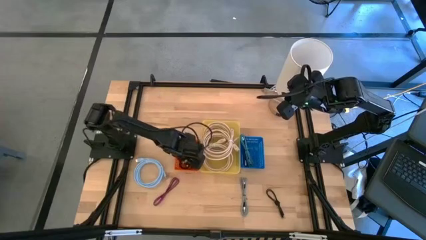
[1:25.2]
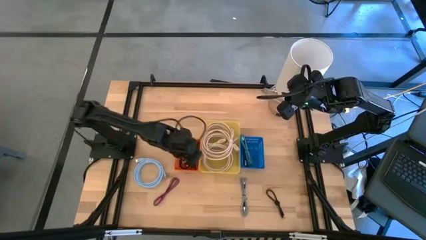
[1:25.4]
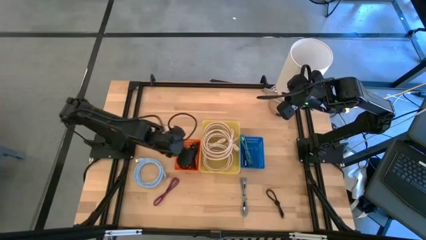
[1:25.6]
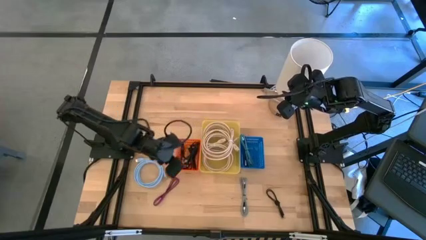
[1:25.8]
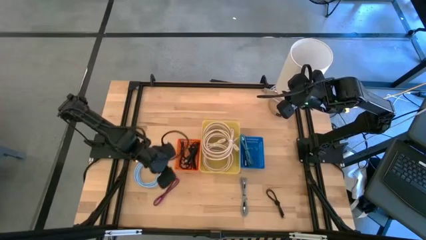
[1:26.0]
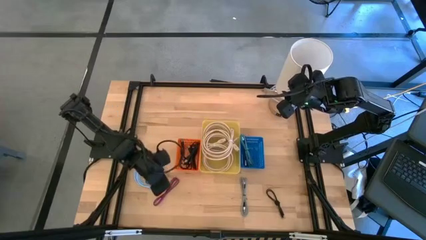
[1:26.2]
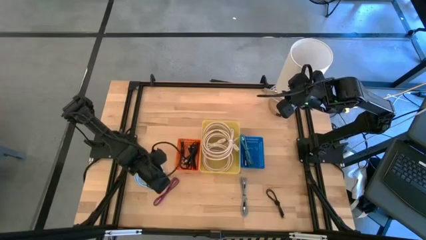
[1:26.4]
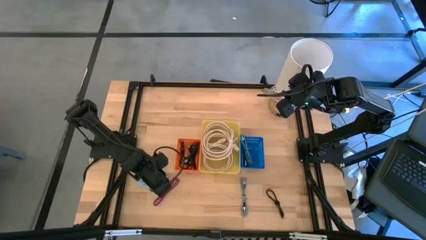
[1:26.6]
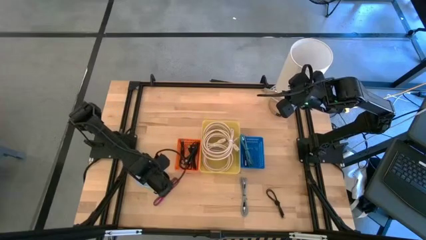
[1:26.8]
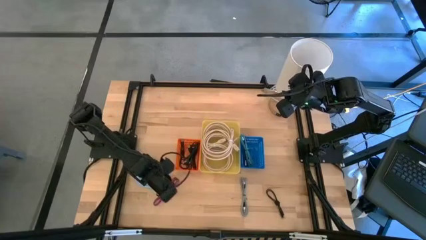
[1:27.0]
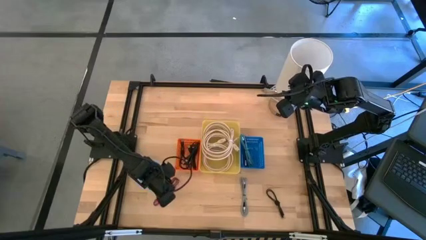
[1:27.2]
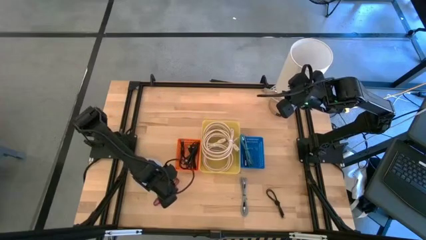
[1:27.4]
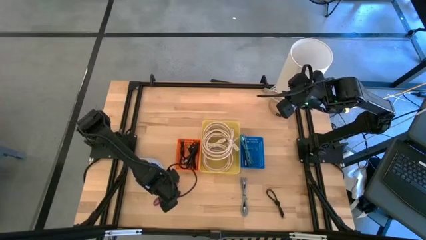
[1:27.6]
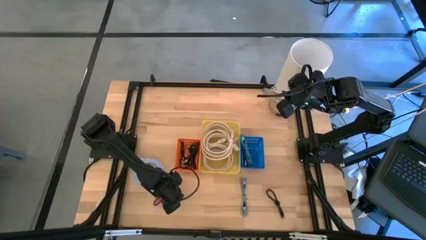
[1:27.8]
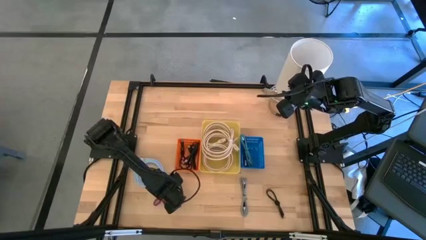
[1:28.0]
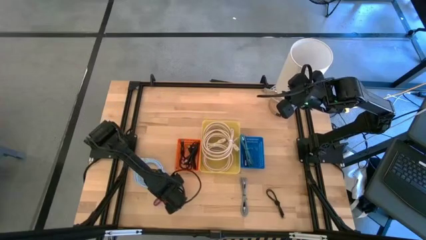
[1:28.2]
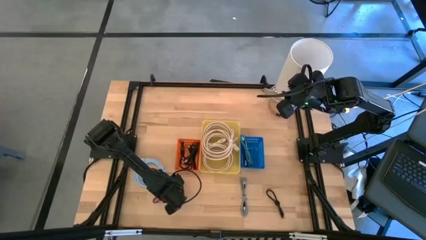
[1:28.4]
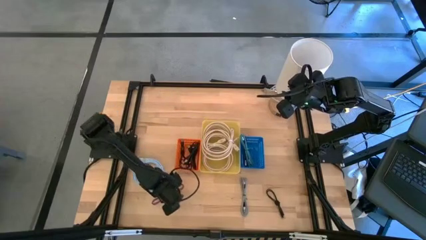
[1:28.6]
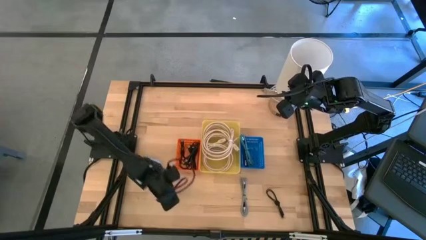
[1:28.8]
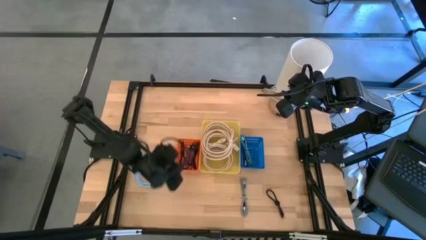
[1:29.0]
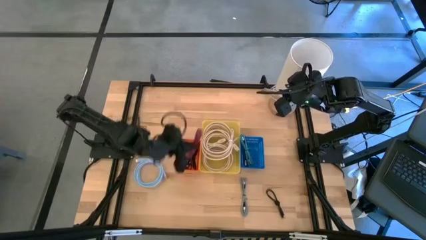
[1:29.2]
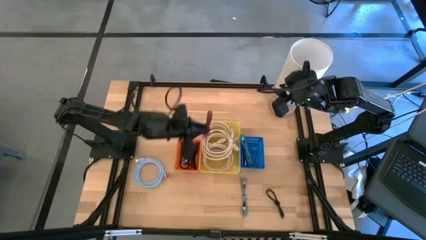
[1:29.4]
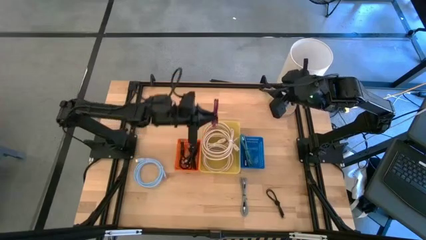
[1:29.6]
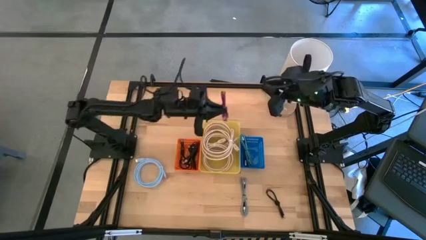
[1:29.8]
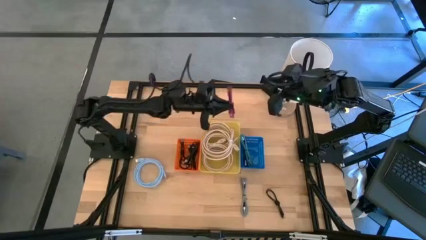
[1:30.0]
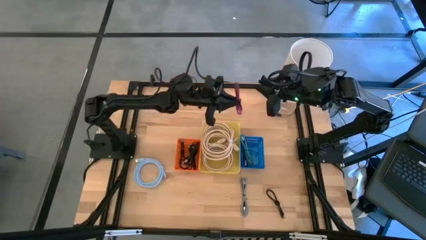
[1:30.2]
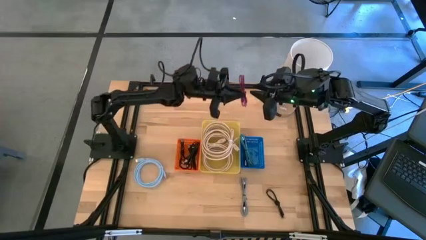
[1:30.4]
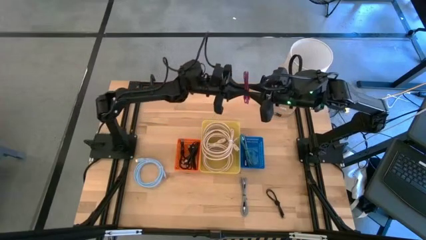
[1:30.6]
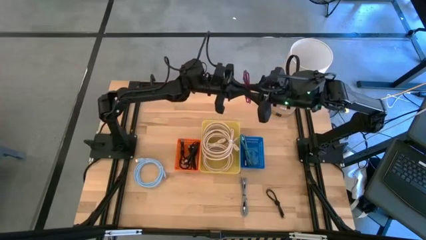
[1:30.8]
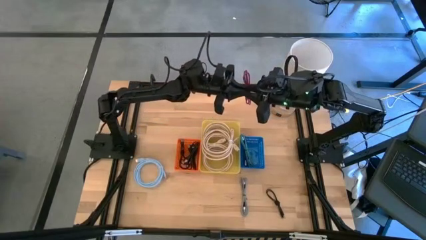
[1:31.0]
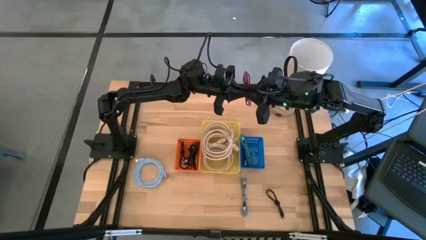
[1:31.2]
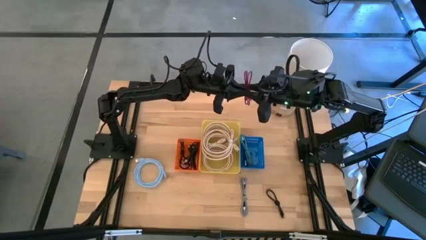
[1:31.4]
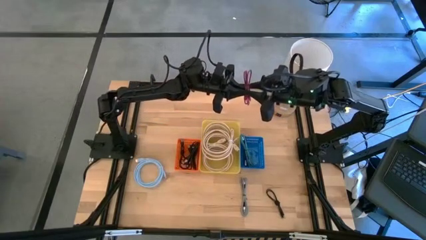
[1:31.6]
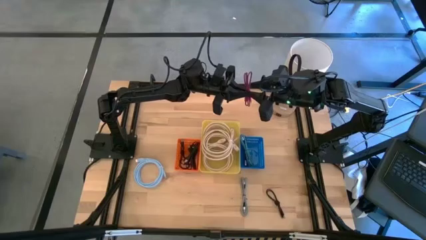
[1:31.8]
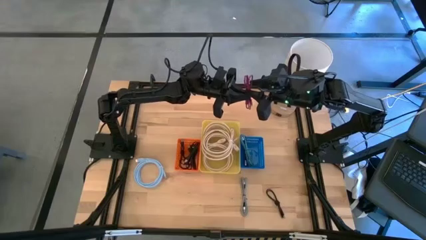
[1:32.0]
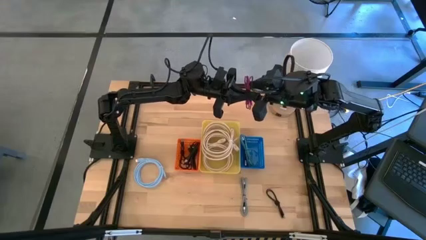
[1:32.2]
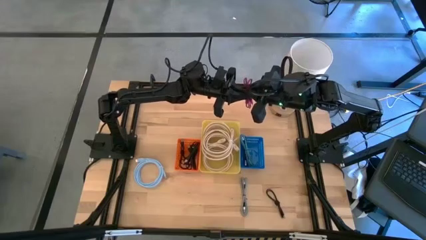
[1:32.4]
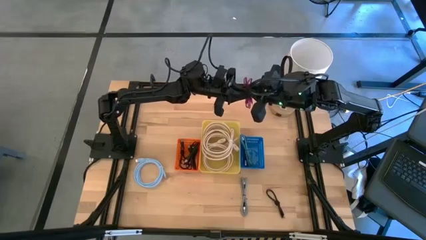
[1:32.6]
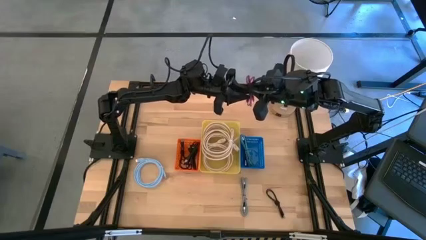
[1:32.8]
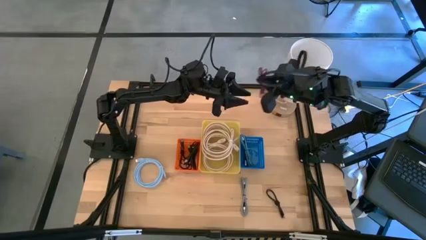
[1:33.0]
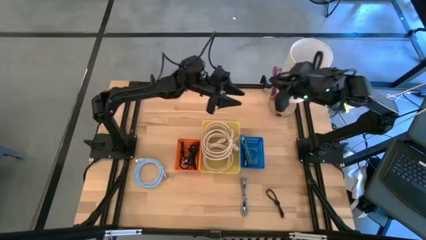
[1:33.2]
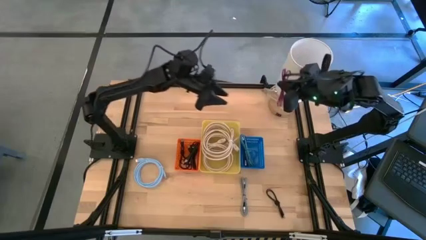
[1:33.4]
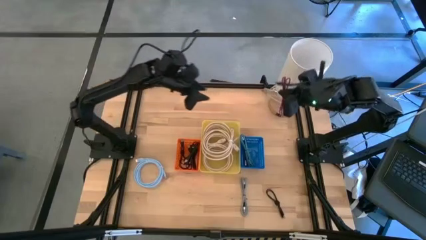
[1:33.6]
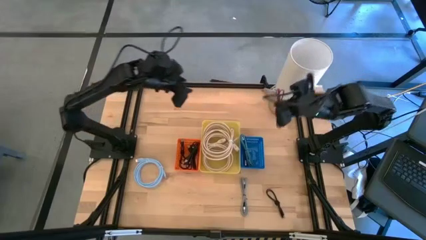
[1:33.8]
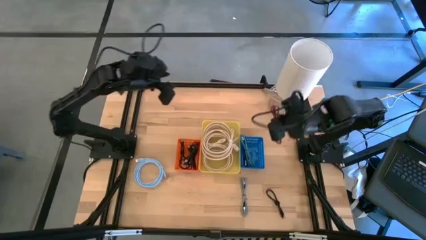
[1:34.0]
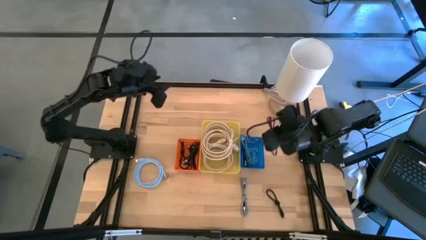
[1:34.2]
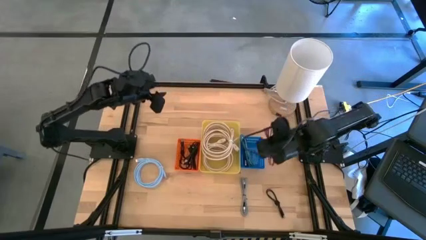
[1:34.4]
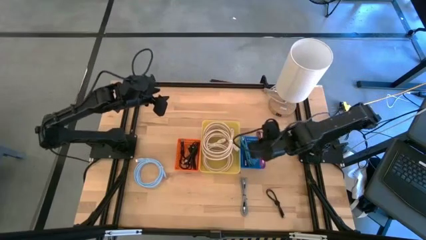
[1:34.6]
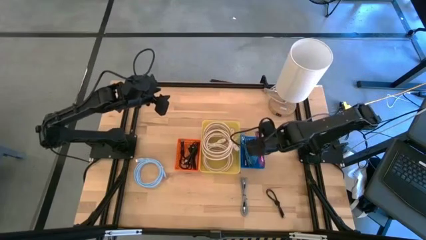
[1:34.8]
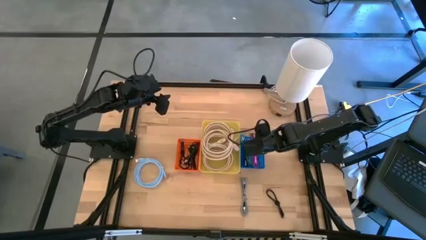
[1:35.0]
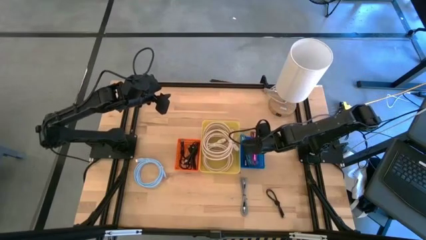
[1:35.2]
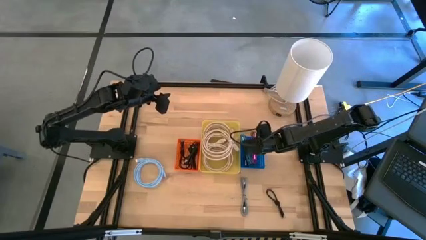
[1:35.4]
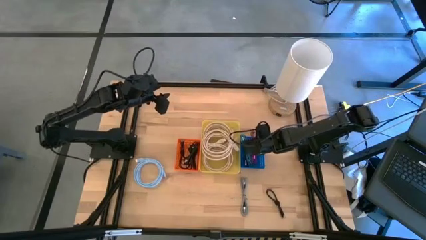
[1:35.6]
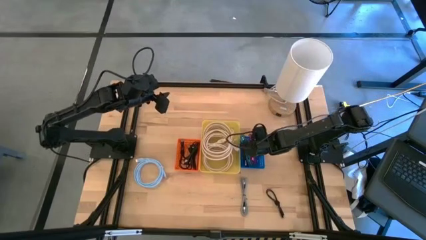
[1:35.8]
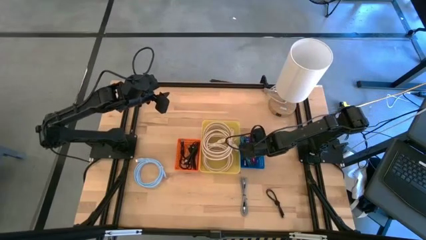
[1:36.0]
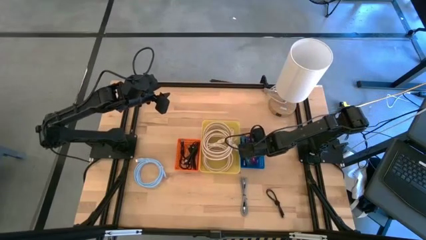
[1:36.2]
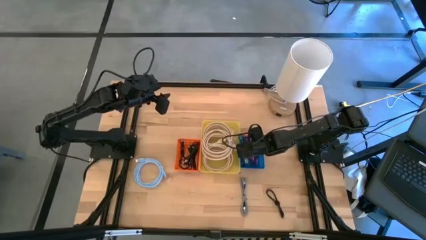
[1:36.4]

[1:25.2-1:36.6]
Task: Pick & Place USB Port
Put the pink patterned usb cable into the blue bin

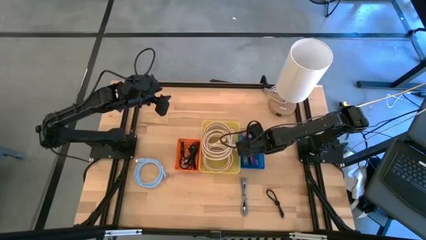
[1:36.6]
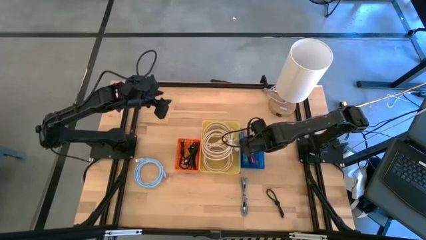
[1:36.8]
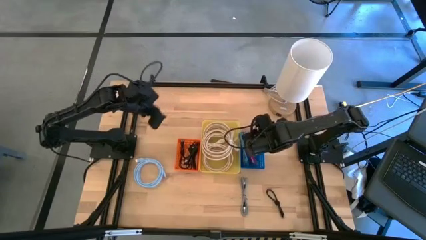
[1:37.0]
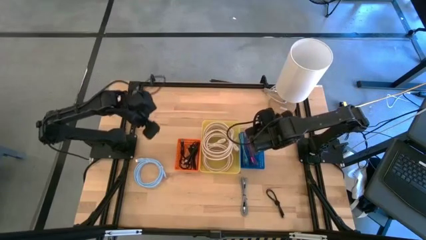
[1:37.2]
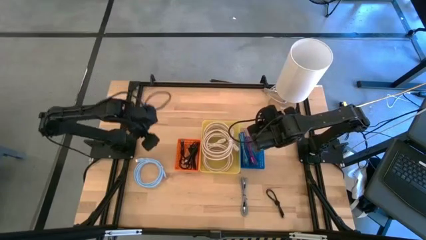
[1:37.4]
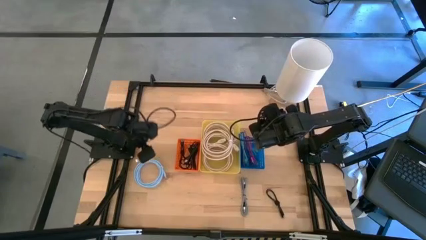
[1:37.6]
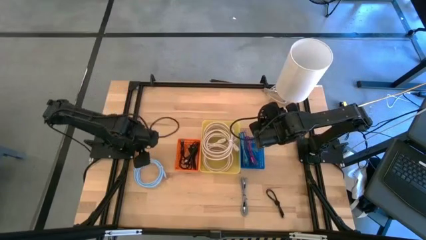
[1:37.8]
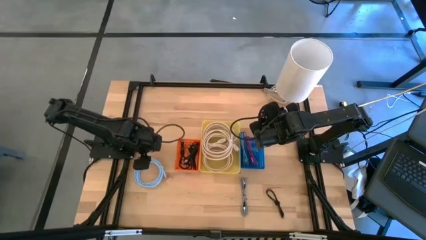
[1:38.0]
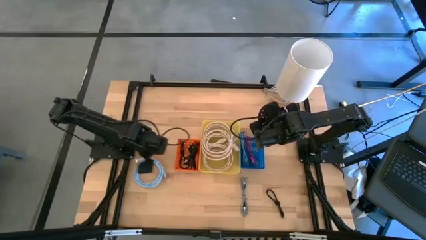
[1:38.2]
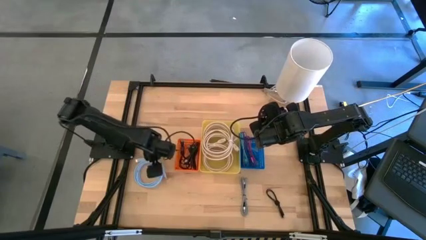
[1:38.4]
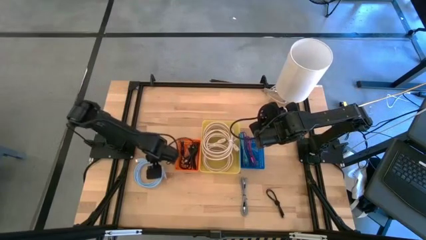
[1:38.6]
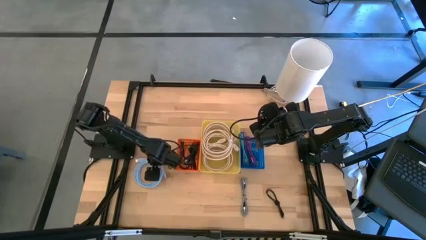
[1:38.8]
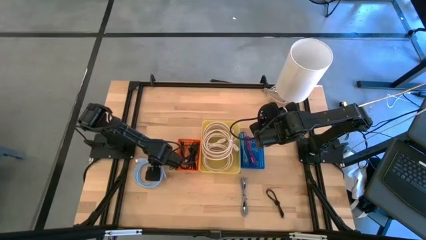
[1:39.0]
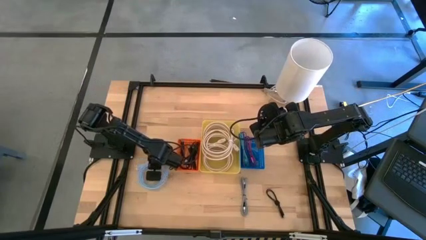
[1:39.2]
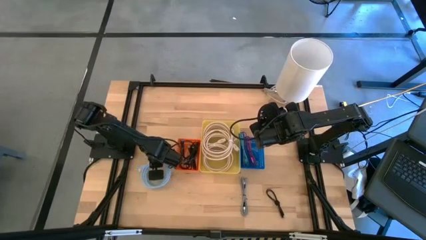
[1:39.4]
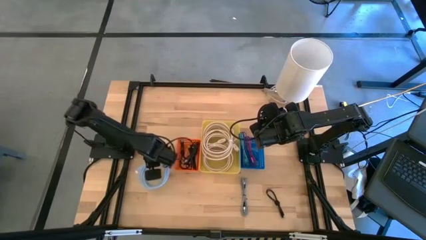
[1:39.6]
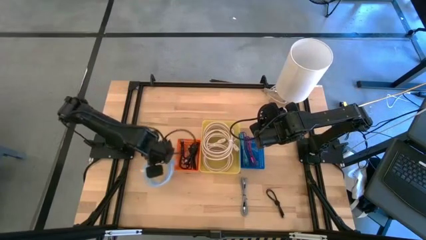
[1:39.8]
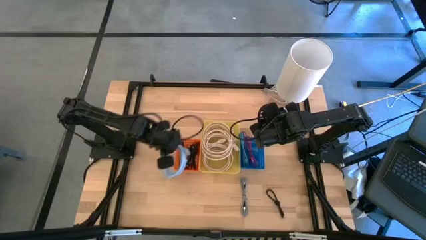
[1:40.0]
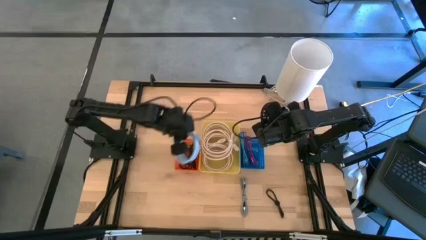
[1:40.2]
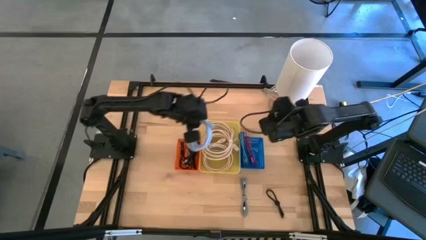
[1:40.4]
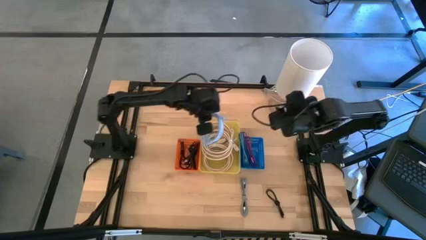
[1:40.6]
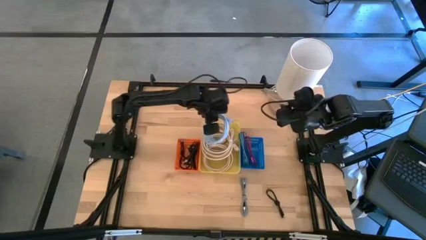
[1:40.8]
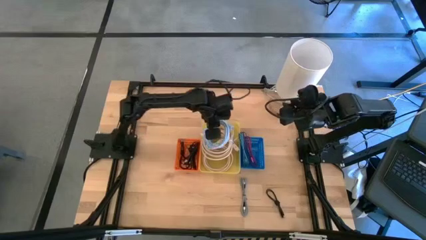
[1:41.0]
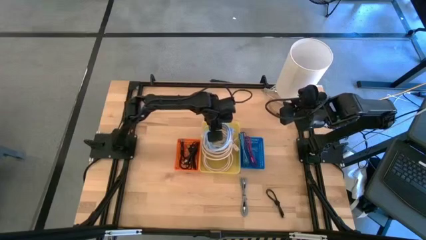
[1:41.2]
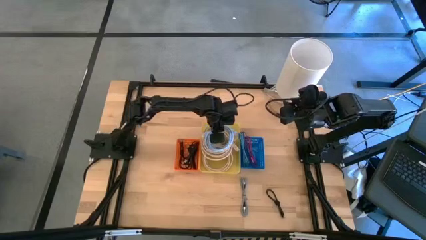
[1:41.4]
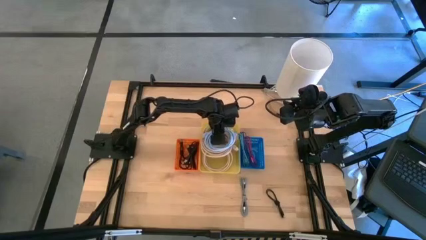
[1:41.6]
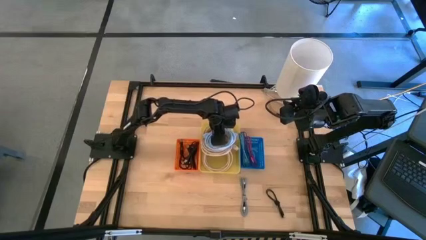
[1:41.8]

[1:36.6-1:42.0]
Put the light blue usb cable into the yellow bin
